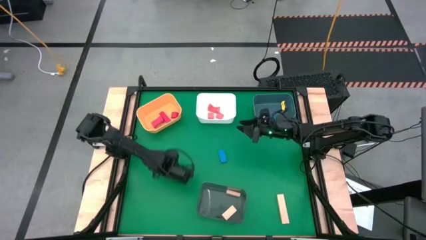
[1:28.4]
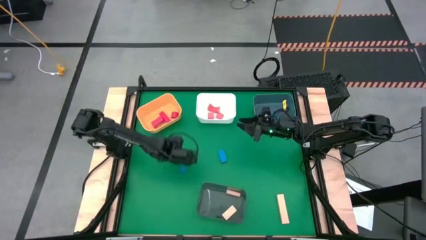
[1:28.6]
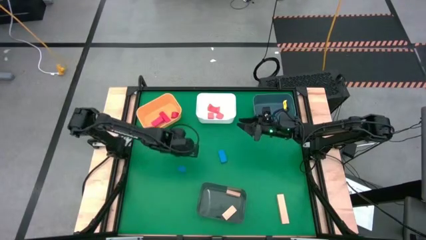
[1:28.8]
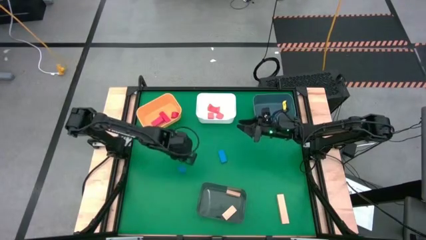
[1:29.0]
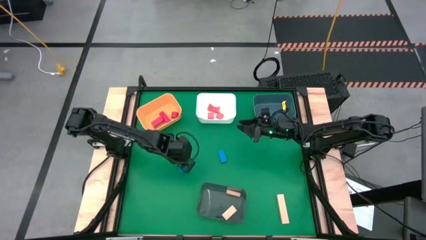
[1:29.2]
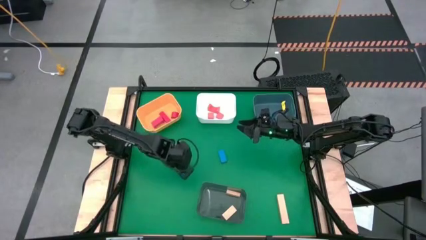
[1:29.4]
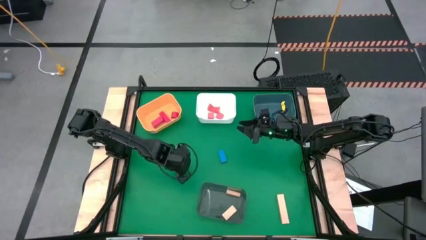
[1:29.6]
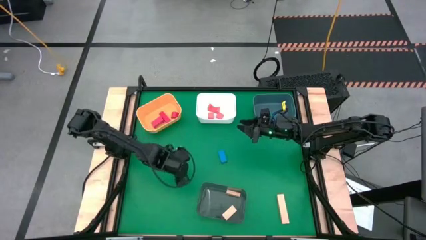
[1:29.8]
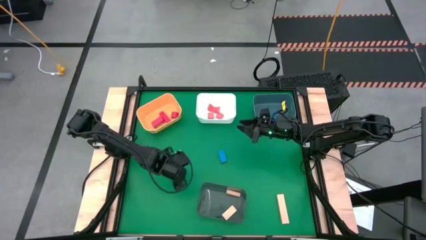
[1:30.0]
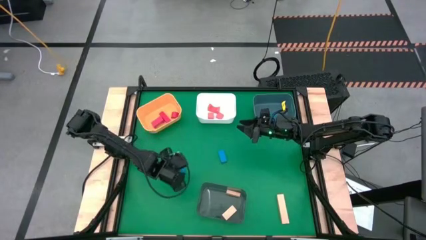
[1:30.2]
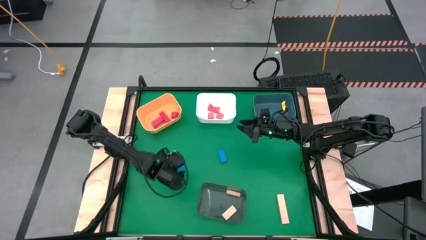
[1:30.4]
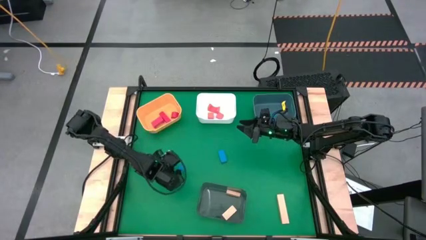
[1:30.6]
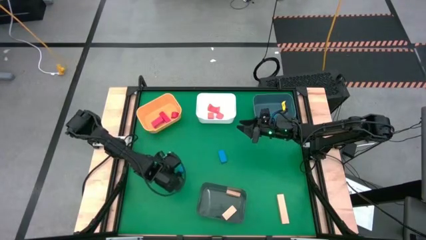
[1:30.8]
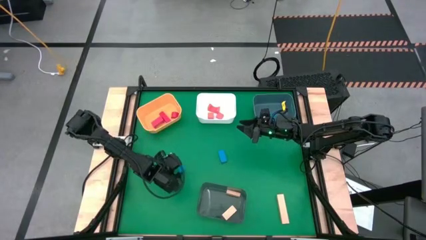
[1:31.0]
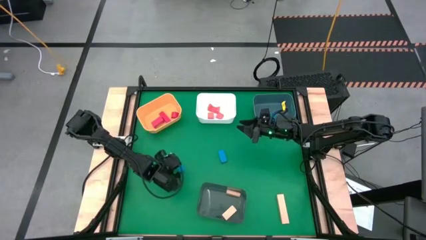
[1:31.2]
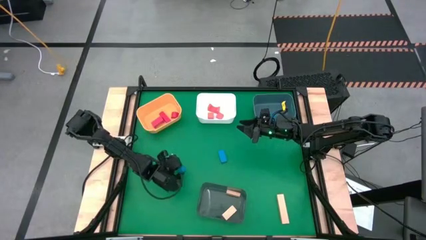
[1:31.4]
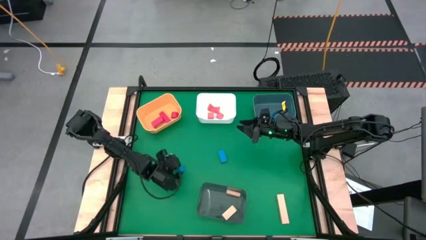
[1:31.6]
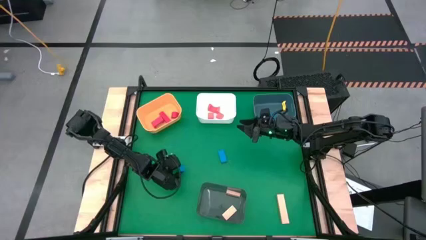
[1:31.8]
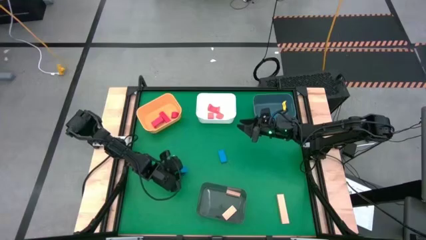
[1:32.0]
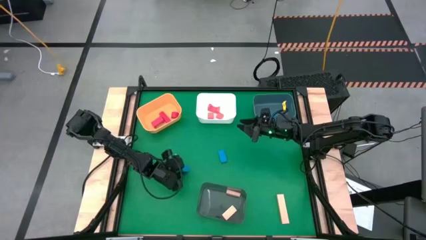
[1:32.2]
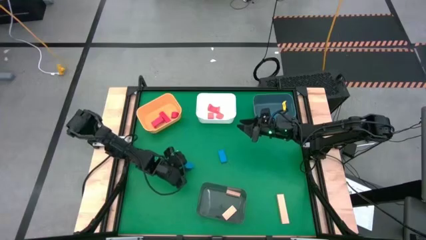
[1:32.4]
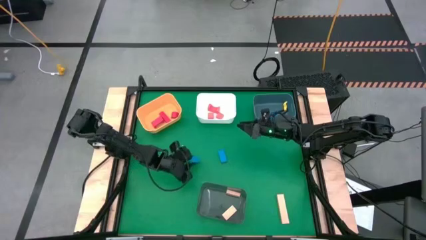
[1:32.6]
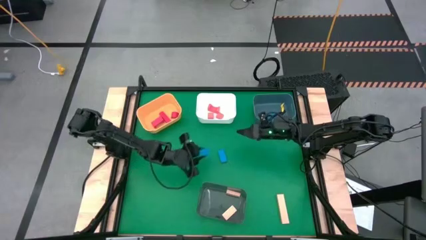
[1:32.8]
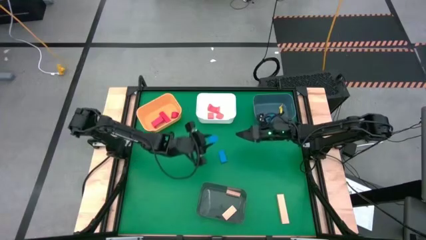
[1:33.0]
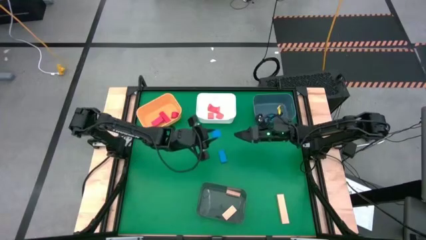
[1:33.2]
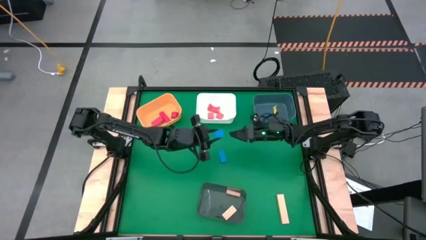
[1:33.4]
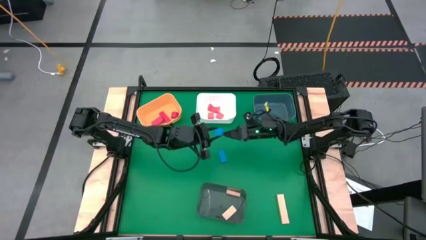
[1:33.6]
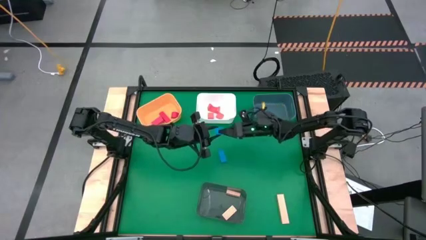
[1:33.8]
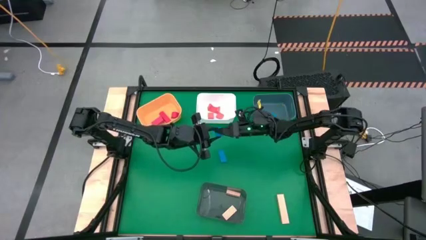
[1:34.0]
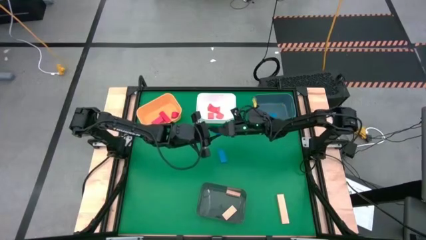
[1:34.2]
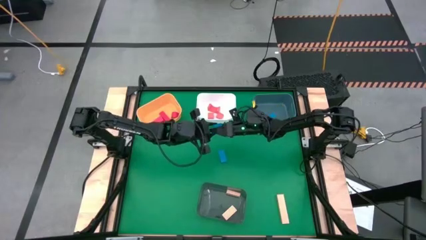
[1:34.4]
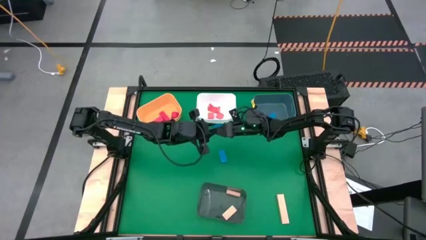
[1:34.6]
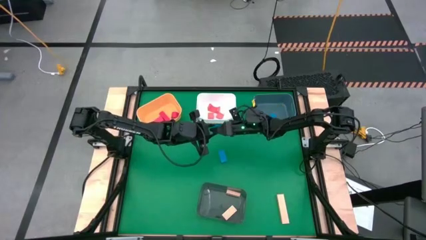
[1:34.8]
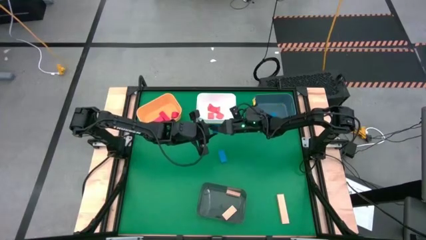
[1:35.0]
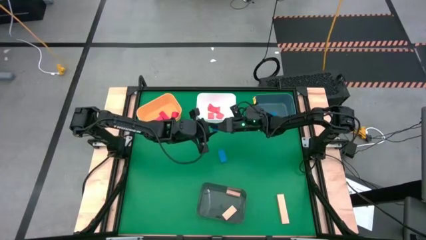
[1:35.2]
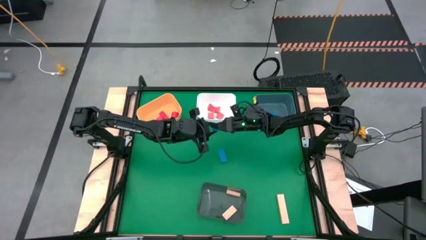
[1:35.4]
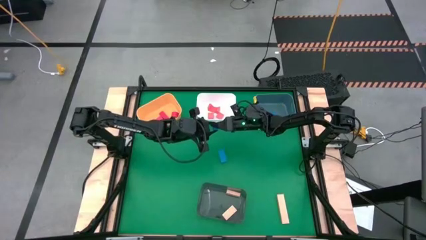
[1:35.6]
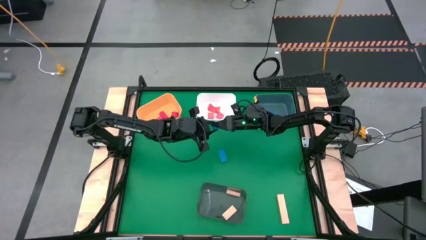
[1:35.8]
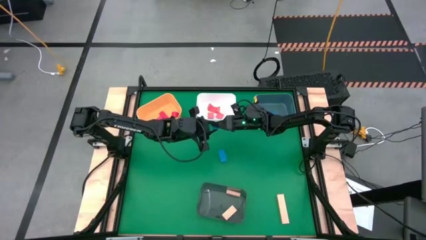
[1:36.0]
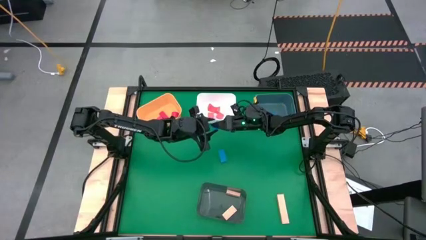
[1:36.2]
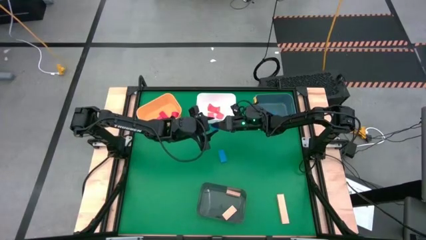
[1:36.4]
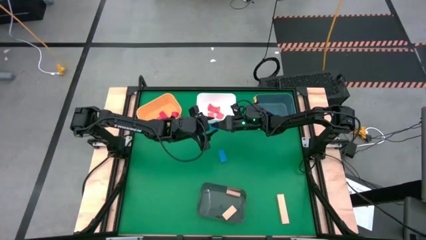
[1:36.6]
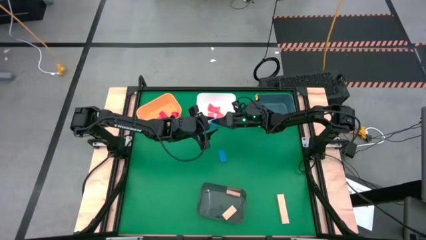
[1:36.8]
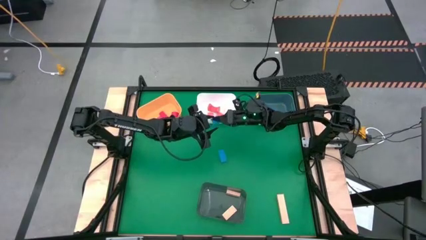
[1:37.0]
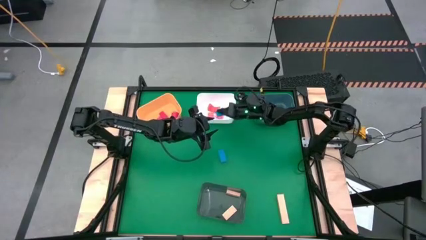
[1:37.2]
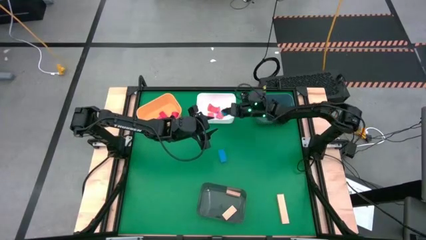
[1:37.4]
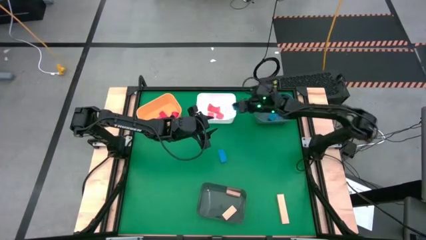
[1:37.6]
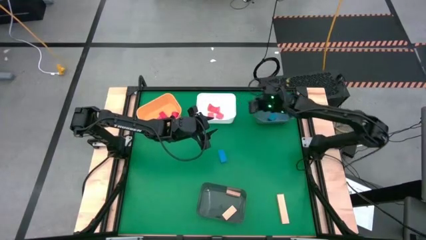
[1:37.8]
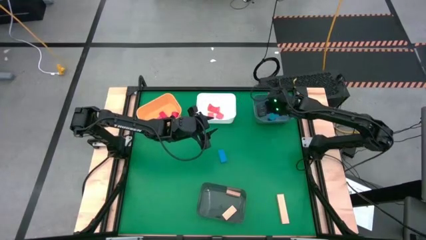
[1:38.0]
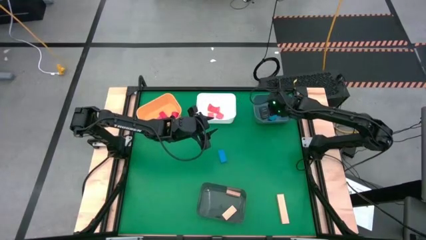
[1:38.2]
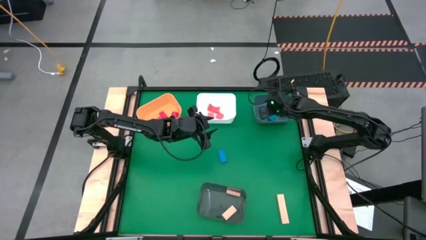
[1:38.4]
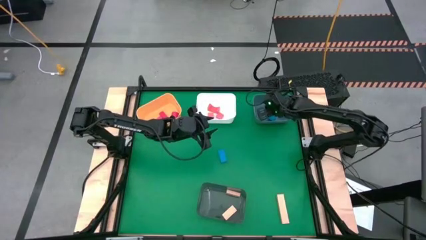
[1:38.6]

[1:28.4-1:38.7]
Task: Sort & place blocks by color
Put the blue block into the blue bin

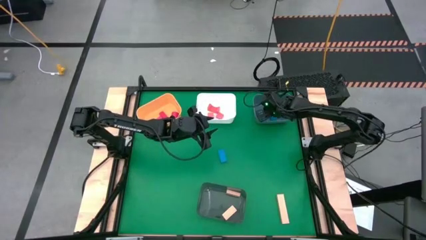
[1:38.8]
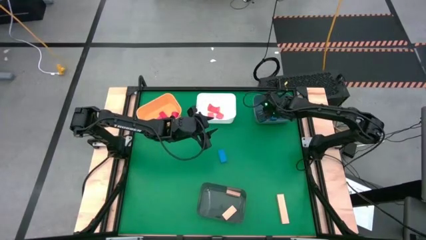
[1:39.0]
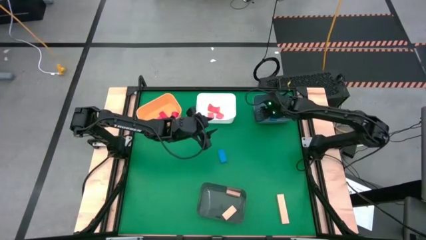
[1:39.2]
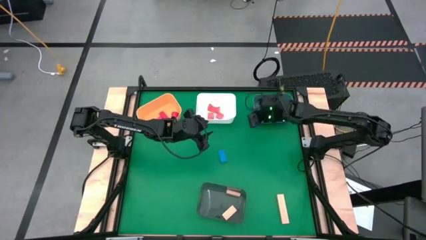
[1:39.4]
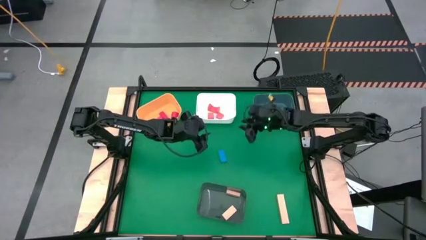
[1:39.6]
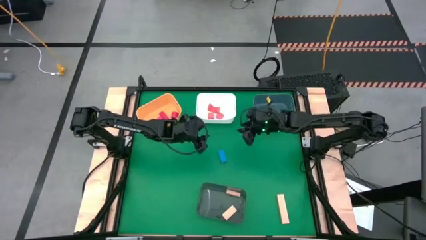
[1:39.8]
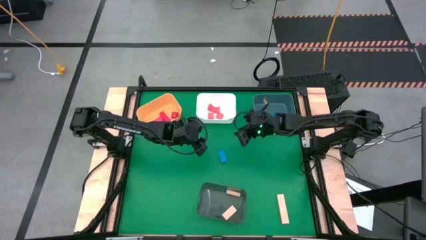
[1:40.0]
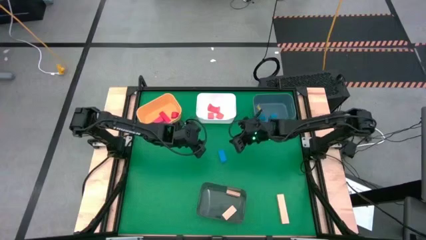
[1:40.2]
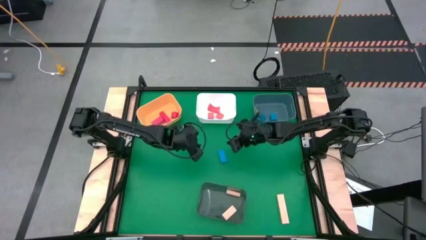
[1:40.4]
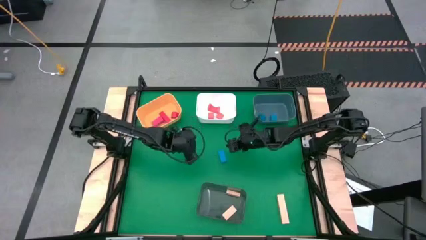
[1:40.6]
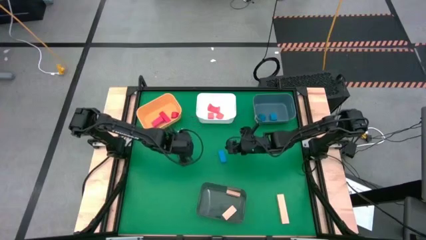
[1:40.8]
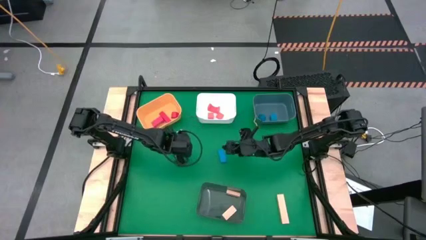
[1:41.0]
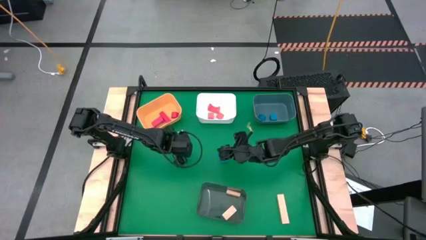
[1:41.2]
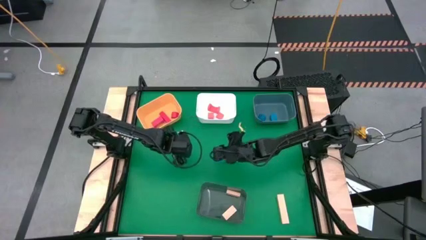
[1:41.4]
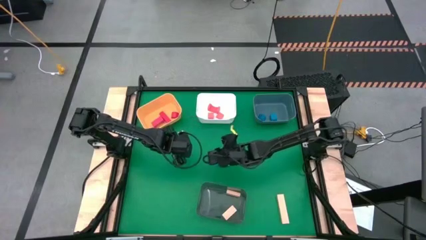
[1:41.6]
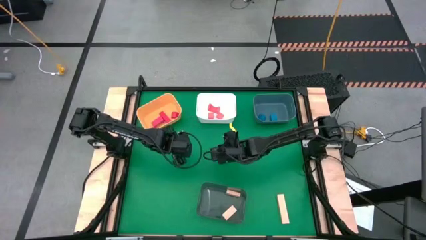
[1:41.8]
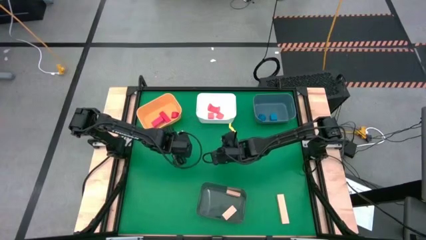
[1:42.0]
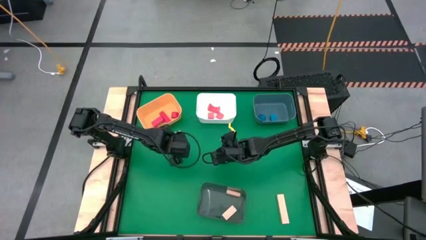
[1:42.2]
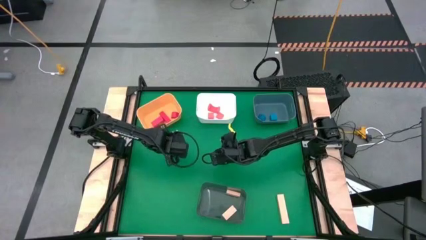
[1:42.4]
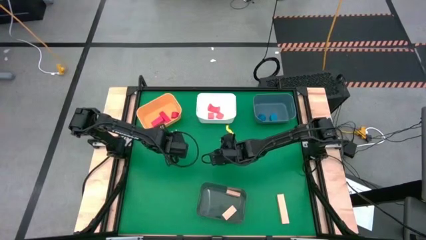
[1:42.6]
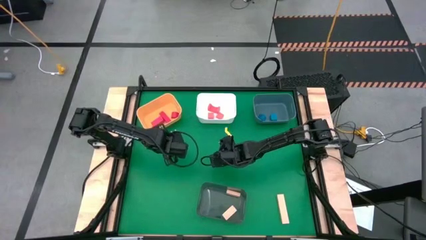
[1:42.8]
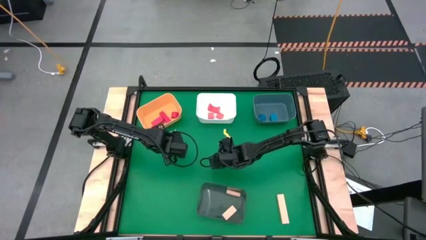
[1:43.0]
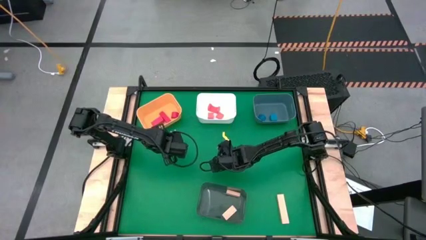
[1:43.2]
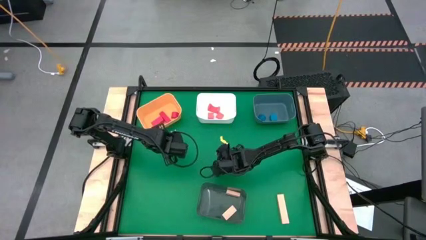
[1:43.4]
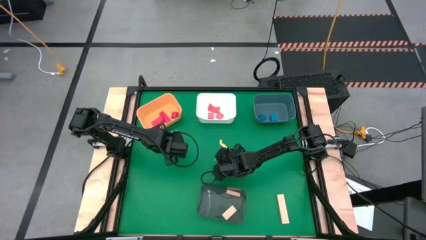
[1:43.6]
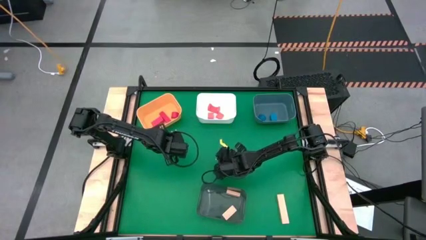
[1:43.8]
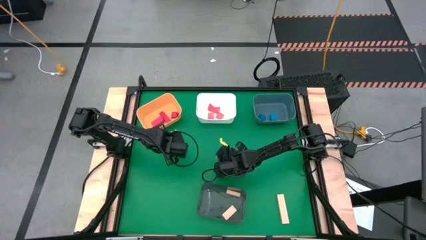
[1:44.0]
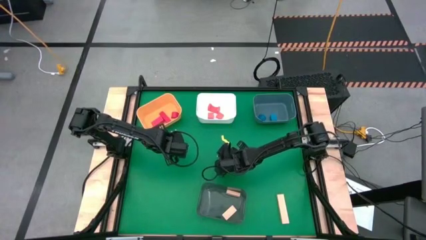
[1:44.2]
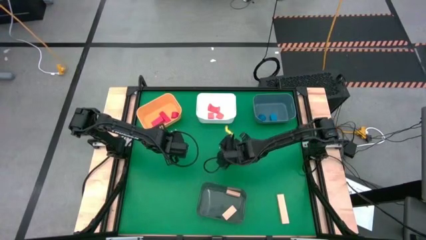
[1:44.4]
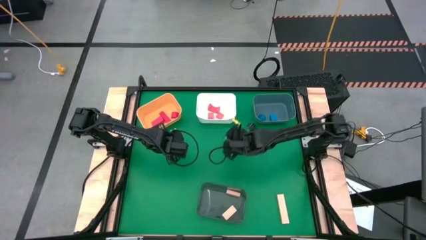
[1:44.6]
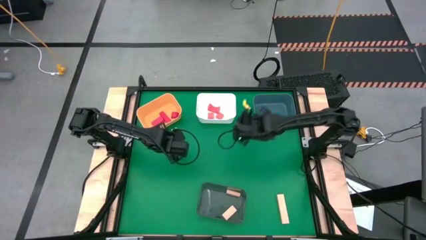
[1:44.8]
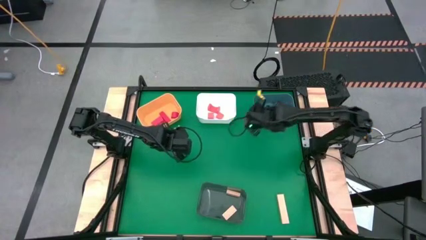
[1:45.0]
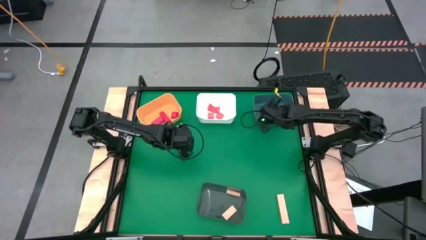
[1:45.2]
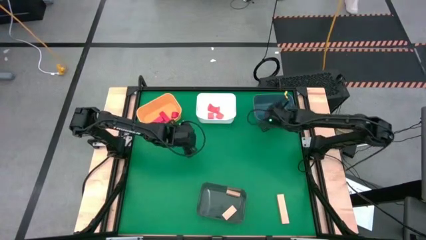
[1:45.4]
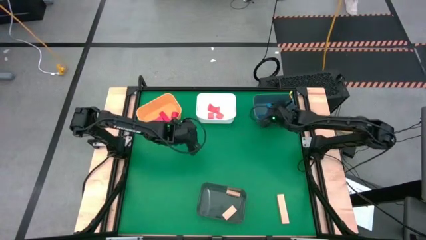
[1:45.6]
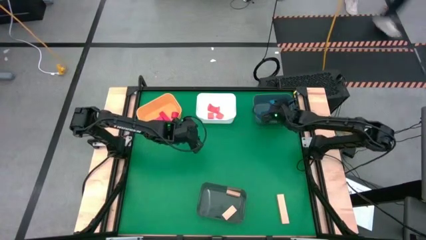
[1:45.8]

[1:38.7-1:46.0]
Put the blue block into the blue bin
